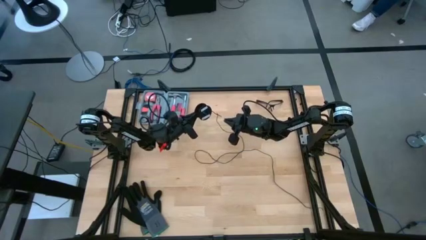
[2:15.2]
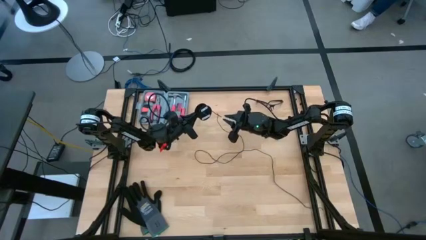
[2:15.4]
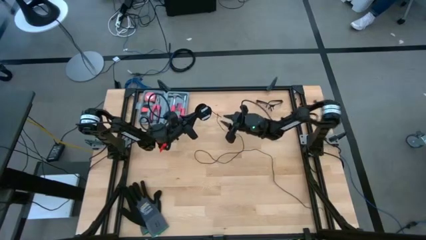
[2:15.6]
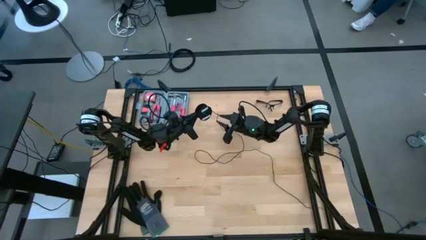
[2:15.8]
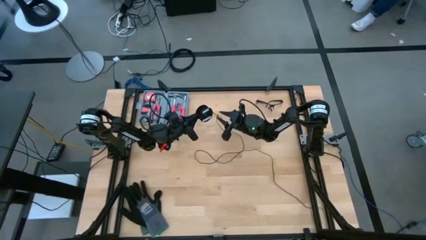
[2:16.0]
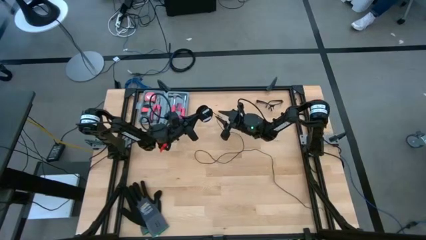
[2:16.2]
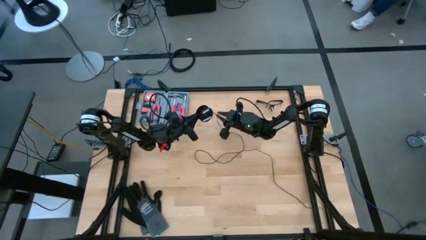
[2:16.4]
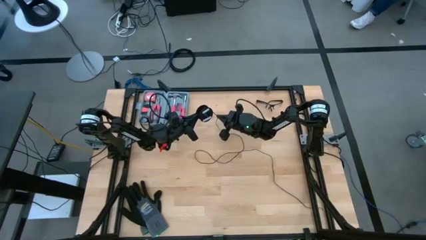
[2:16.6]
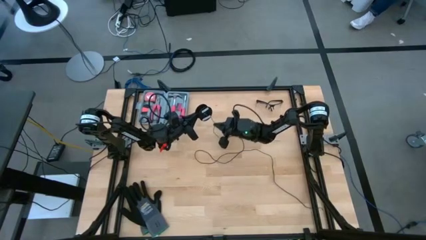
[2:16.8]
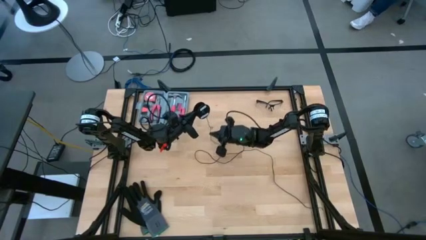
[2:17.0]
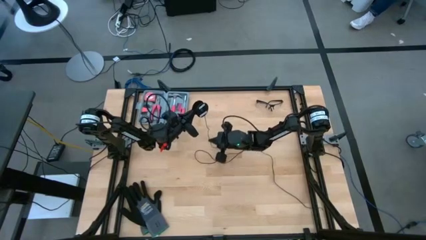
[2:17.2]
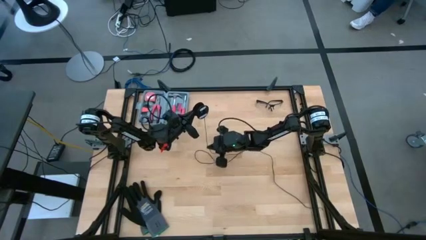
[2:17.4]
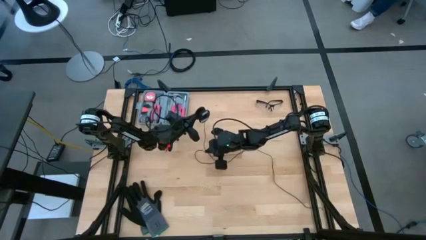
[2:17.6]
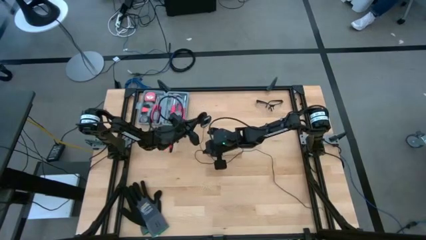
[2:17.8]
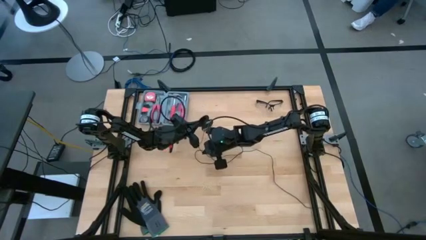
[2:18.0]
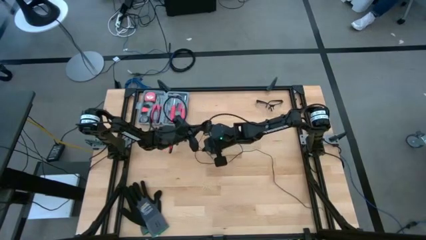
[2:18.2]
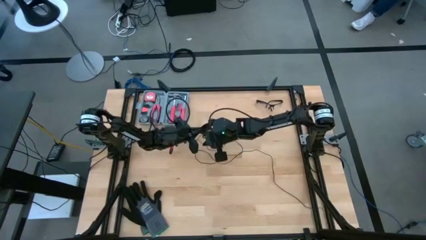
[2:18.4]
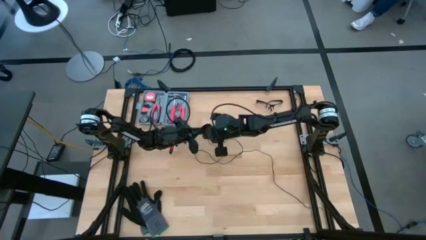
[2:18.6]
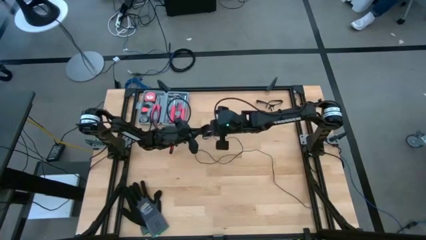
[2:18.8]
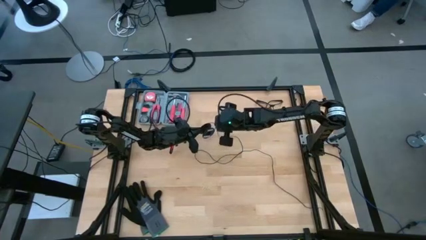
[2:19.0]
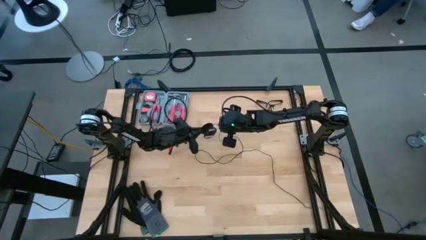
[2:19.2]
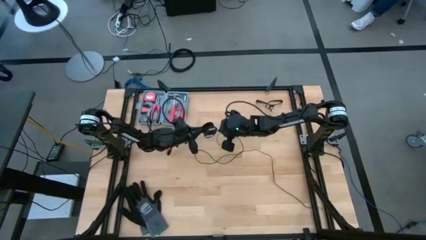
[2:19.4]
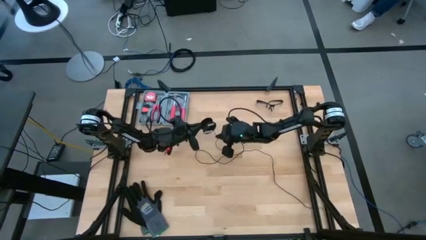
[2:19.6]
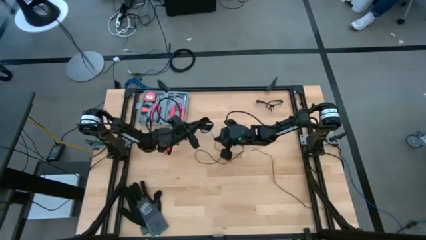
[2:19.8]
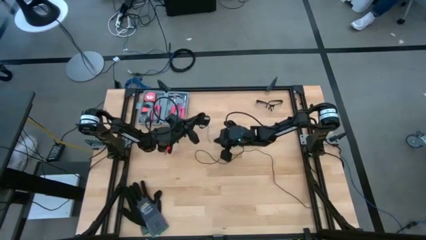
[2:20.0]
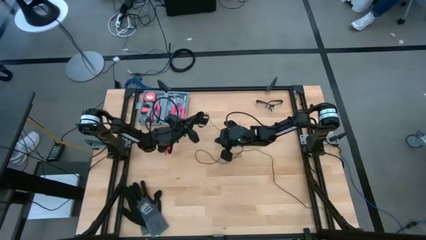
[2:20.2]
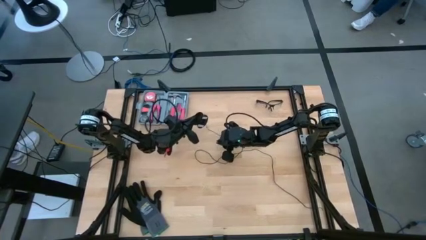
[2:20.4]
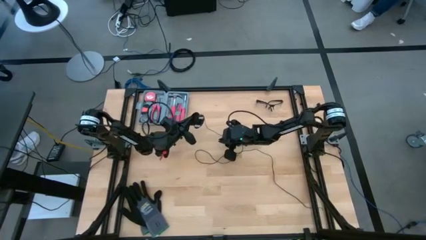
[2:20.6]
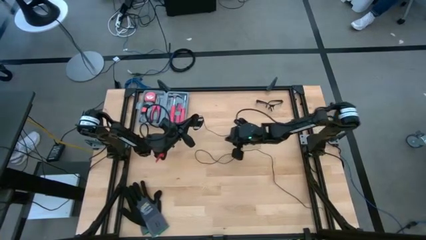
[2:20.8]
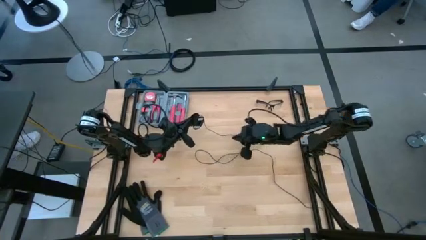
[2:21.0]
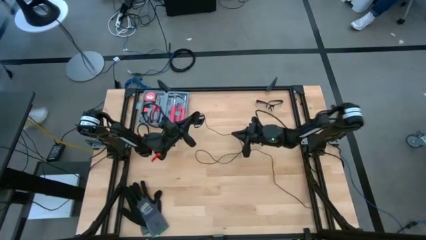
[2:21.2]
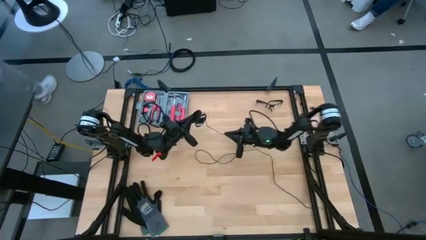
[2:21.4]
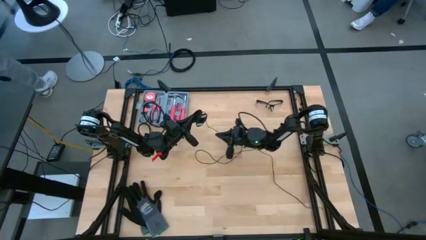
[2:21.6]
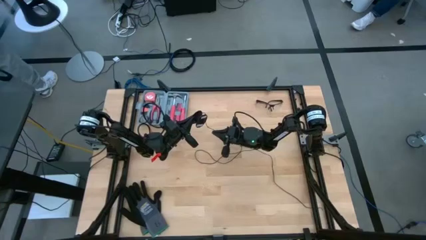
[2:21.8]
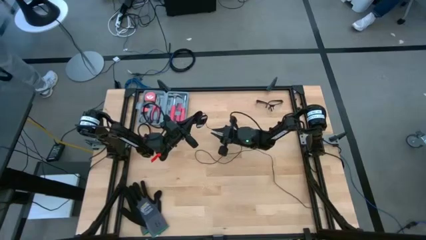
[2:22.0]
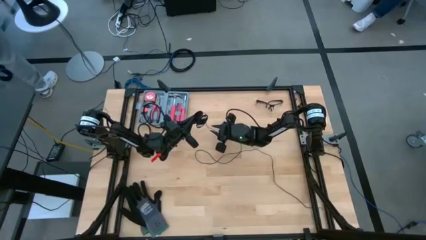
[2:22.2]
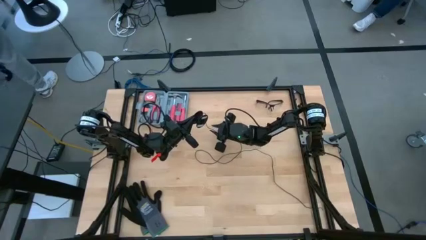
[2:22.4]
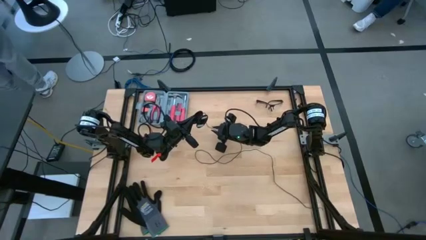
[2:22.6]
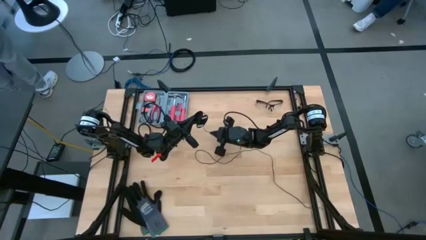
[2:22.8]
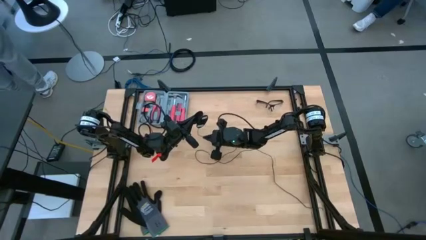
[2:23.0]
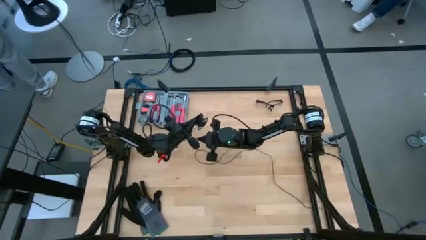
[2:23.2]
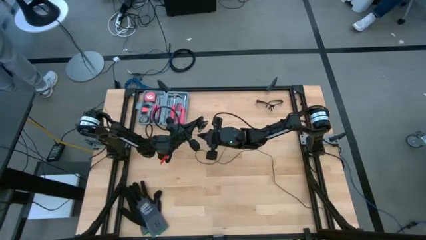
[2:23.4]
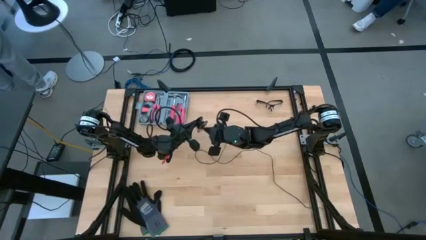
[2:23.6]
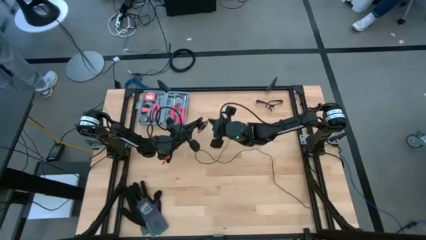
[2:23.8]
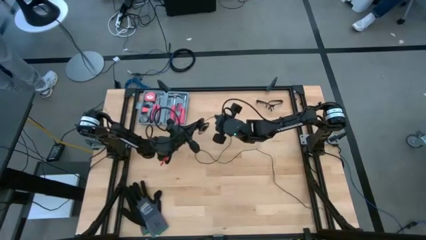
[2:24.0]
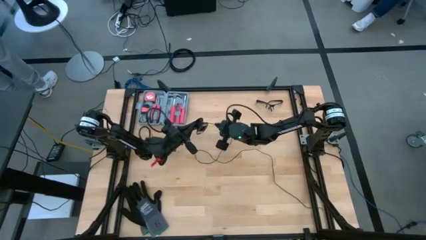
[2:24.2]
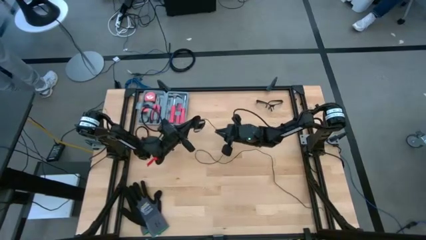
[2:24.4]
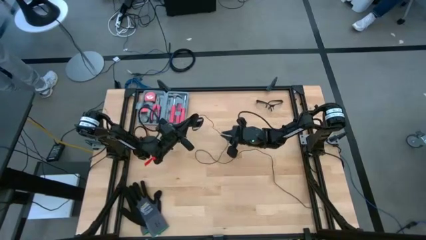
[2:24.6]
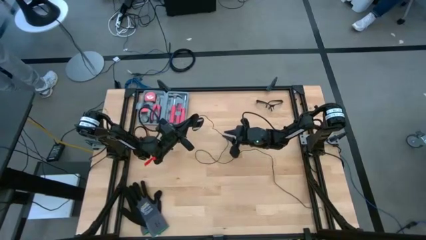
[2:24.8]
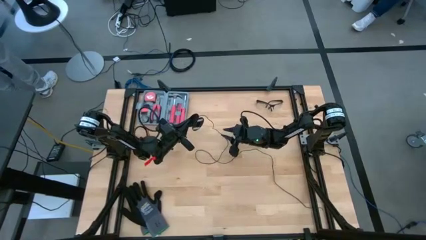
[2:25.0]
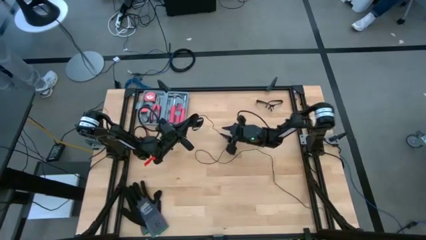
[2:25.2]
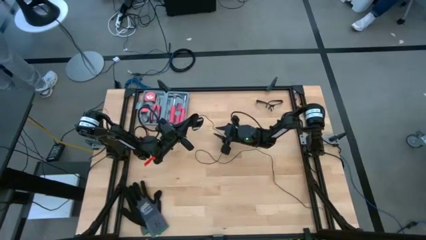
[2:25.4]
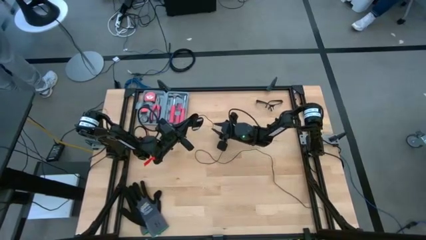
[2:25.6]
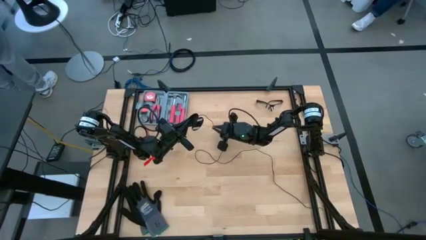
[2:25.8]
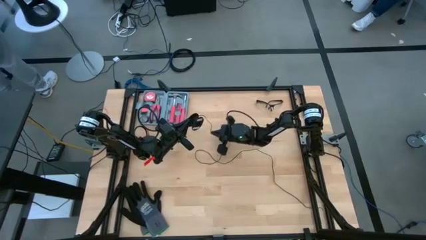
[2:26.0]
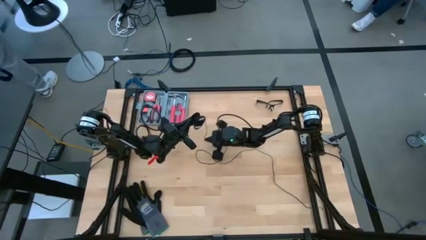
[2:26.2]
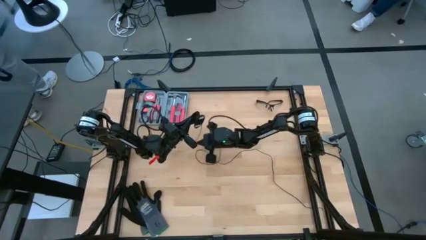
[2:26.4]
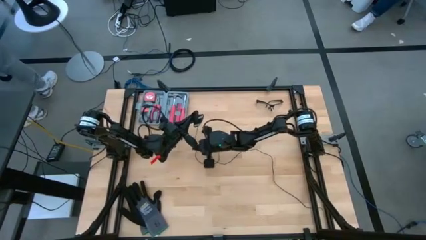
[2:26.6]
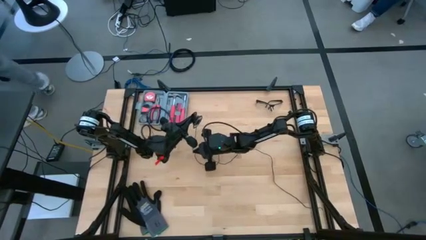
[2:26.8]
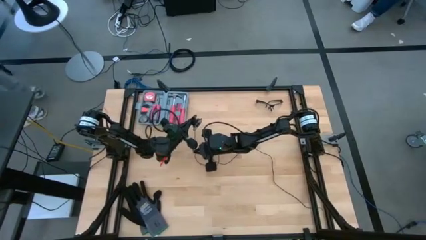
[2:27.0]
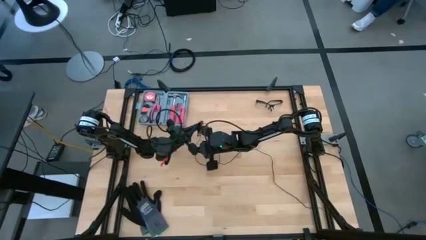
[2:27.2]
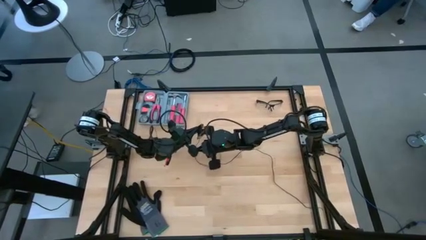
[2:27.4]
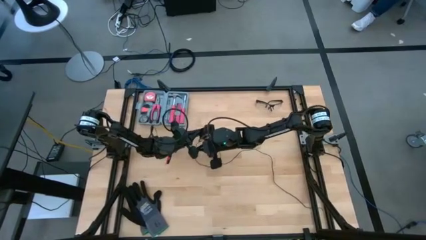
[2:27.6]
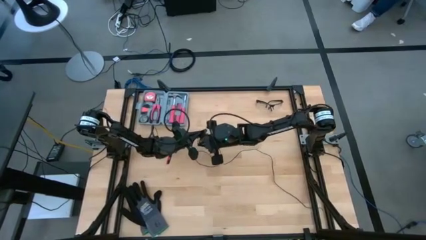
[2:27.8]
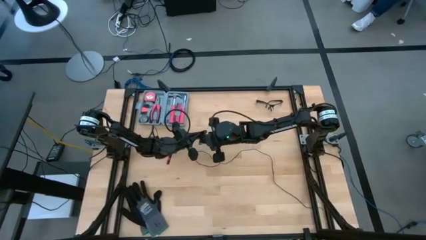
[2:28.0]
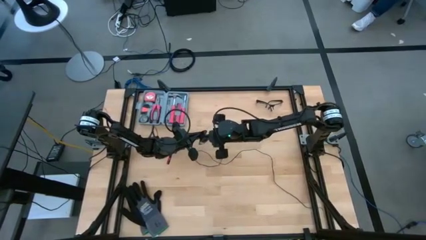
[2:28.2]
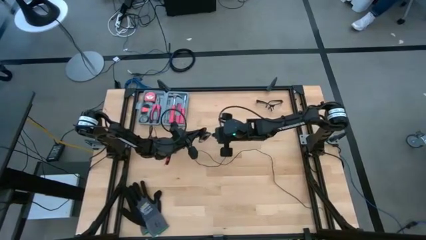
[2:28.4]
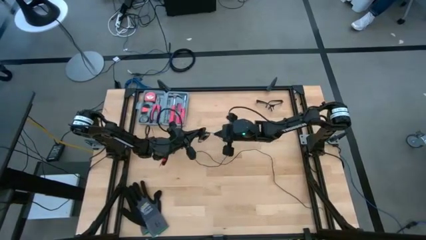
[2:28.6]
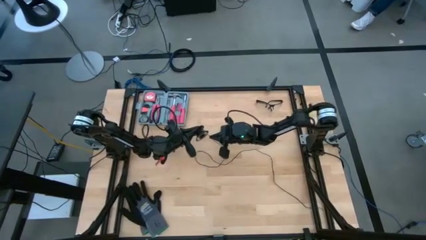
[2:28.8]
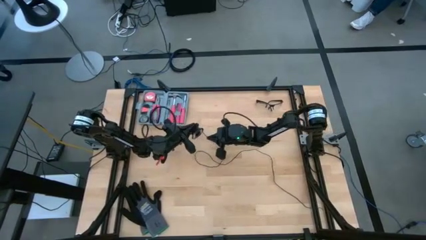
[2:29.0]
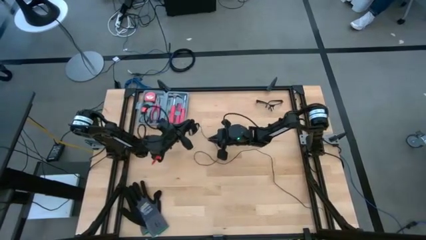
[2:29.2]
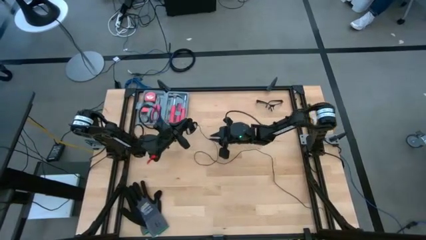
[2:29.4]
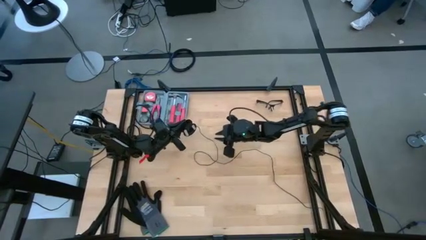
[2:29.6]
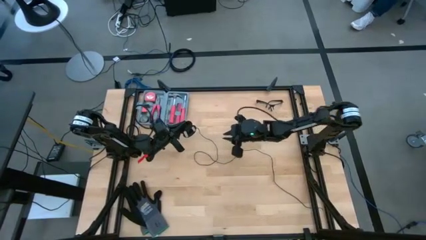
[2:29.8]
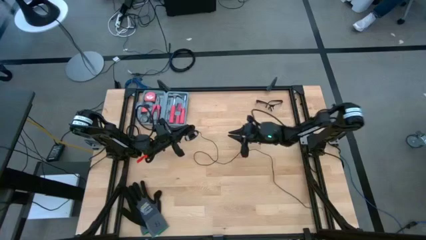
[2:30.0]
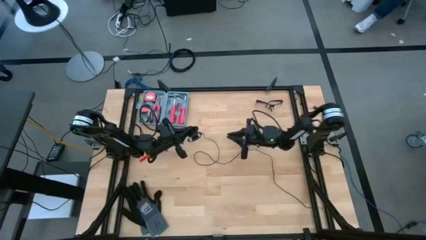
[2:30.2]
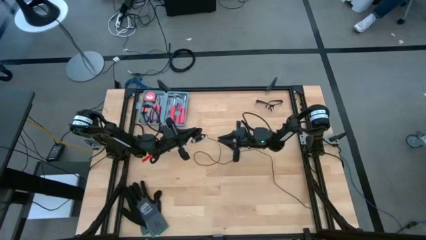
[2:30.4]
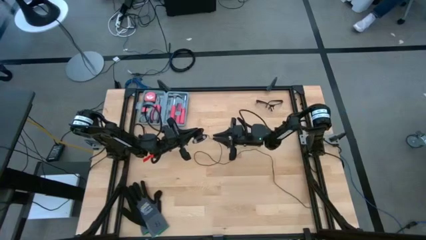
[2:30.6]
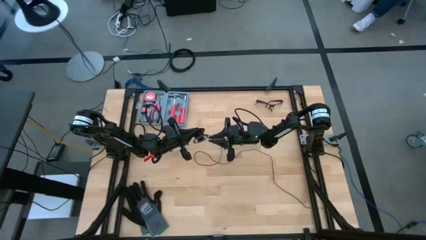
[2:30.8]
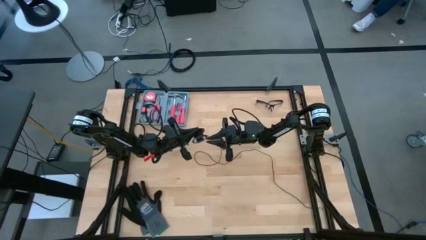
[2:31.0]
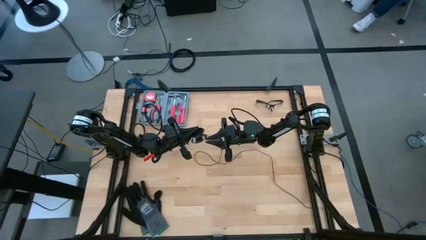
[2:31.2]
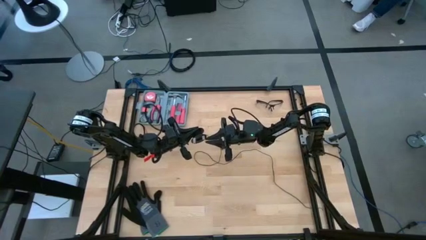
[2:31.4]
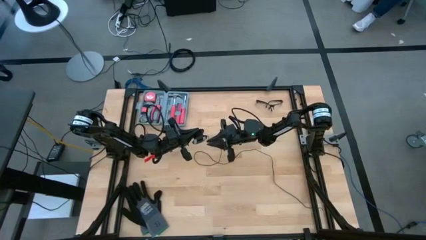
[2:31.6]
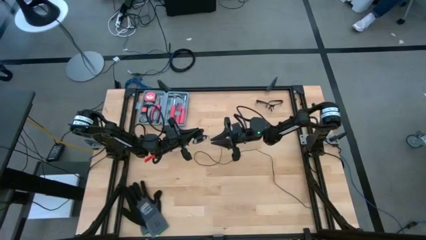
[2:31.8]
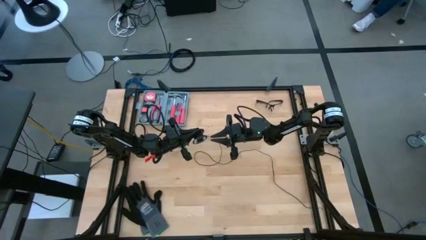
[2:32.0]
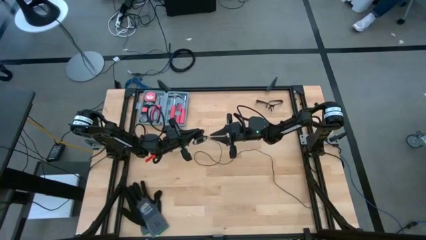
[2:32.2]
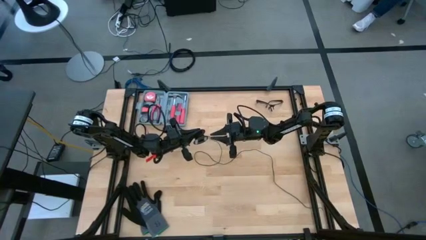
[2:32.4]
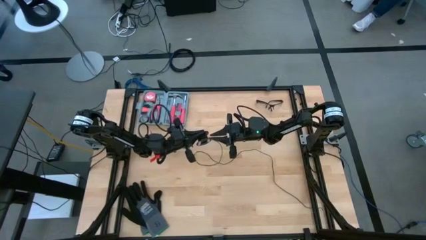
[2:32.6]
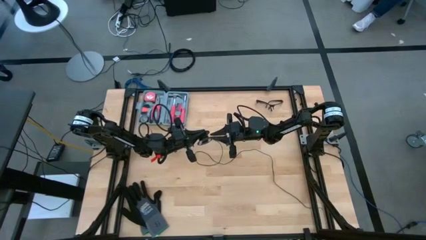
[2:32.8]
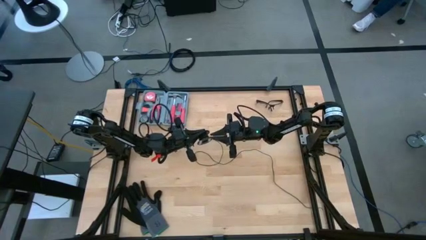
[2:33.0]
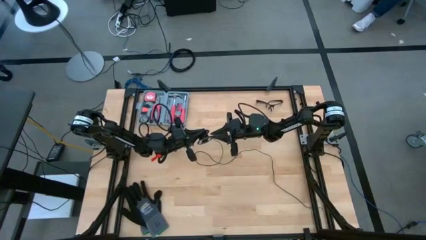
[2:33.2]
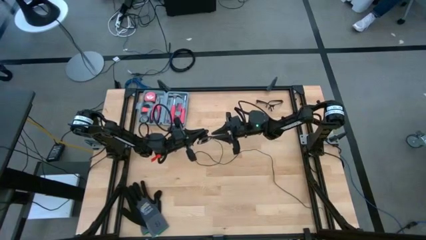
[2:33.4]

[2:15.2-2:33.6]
Task: Coil cords
Coil the black wire on the black spool
